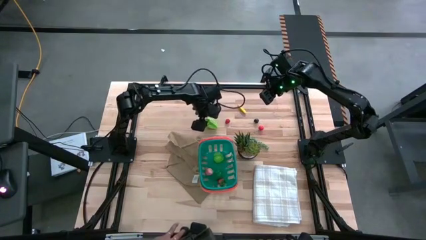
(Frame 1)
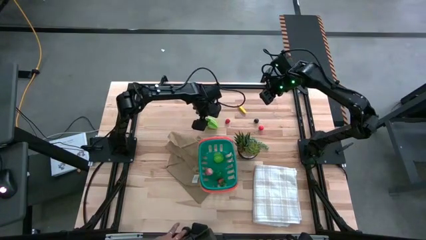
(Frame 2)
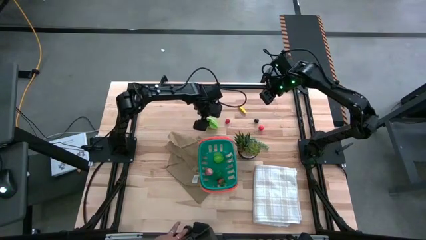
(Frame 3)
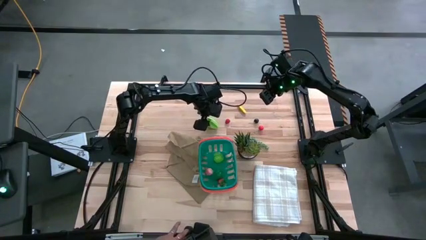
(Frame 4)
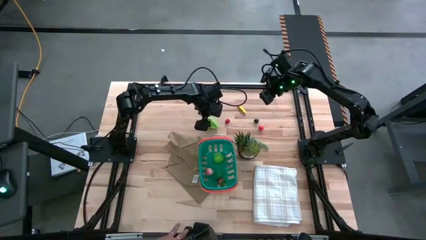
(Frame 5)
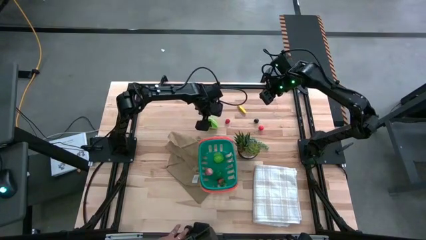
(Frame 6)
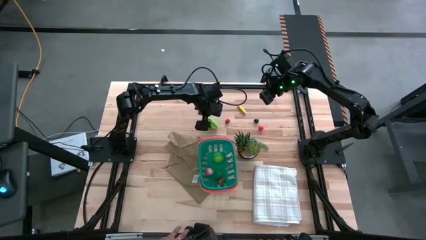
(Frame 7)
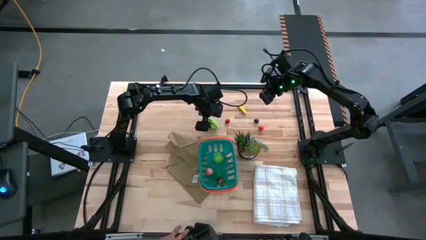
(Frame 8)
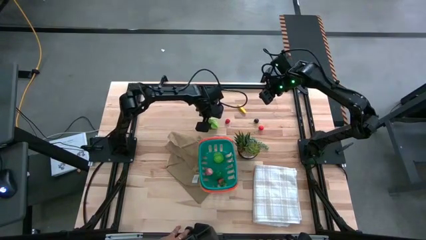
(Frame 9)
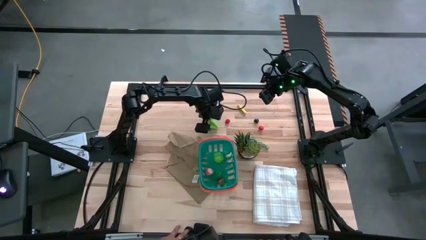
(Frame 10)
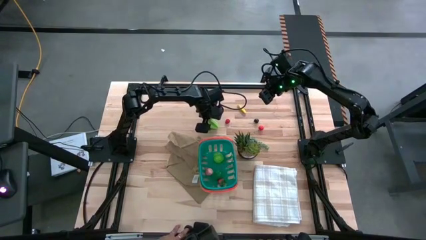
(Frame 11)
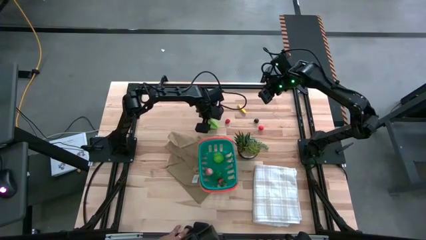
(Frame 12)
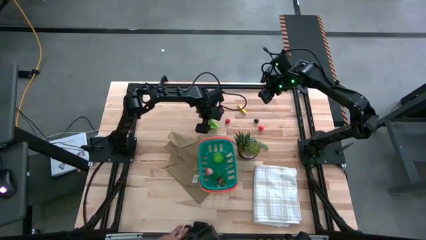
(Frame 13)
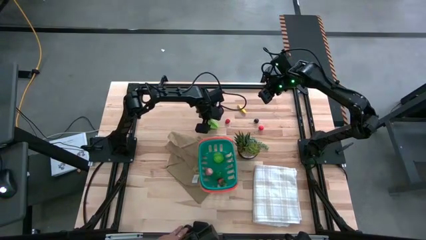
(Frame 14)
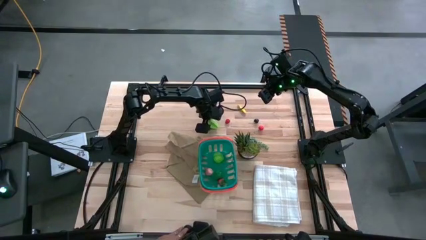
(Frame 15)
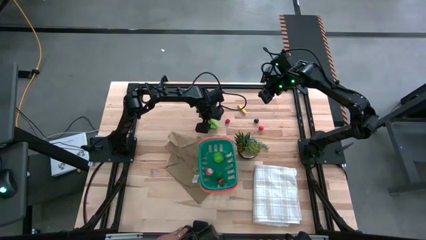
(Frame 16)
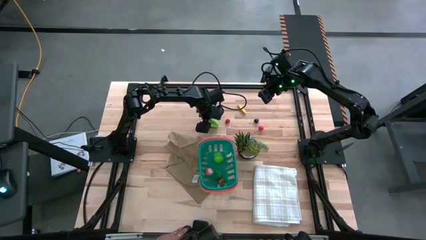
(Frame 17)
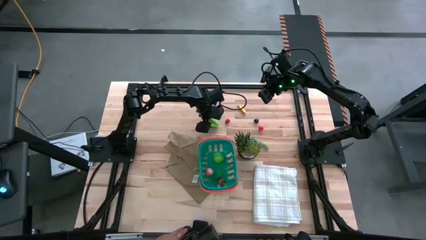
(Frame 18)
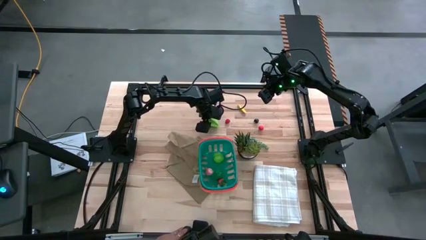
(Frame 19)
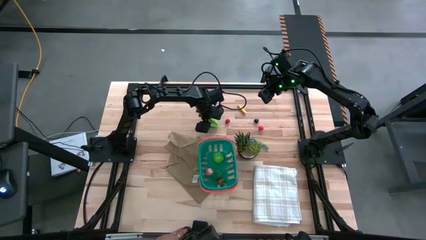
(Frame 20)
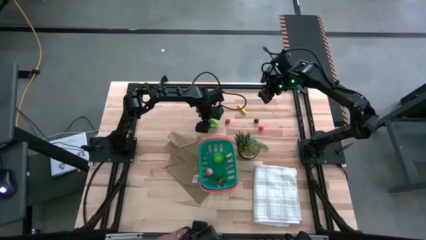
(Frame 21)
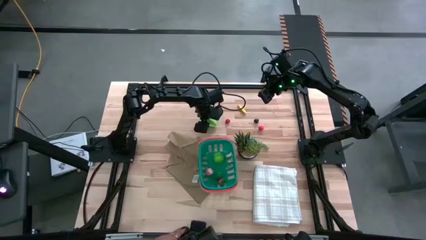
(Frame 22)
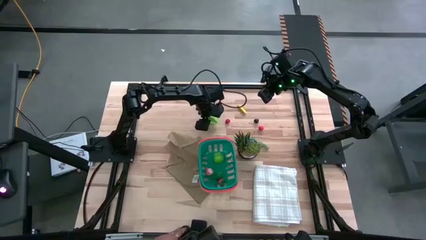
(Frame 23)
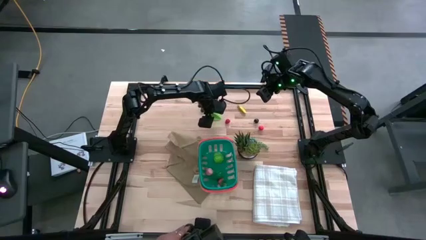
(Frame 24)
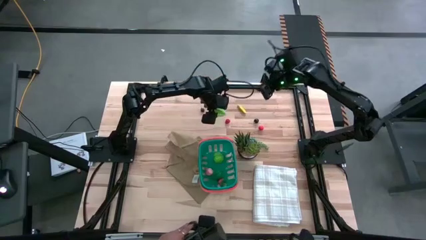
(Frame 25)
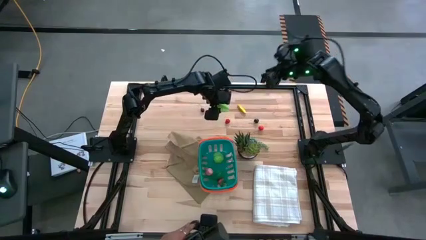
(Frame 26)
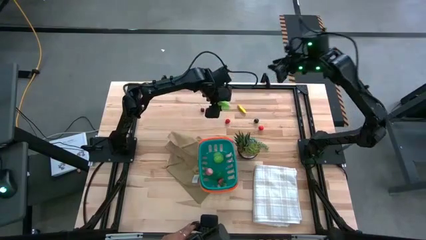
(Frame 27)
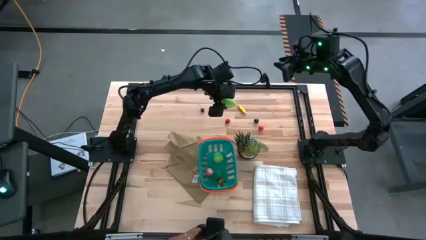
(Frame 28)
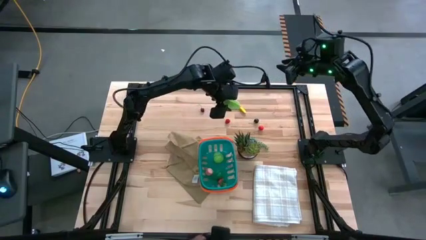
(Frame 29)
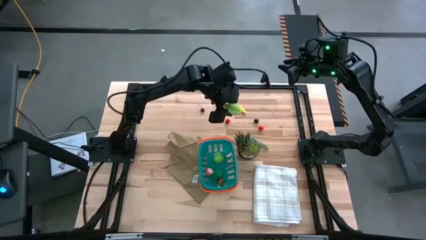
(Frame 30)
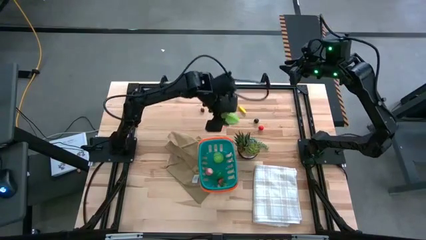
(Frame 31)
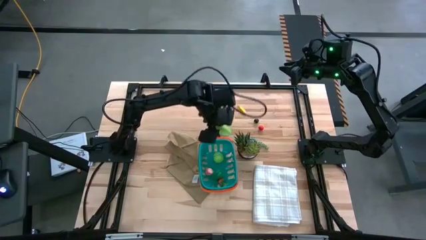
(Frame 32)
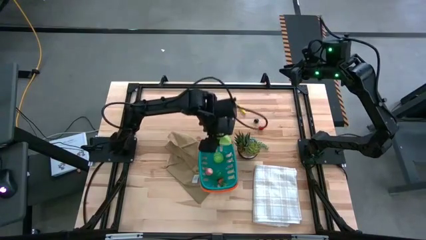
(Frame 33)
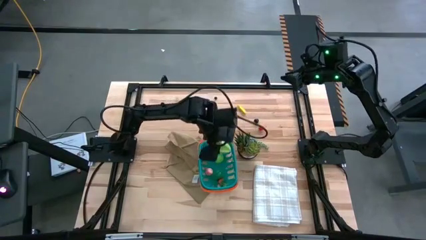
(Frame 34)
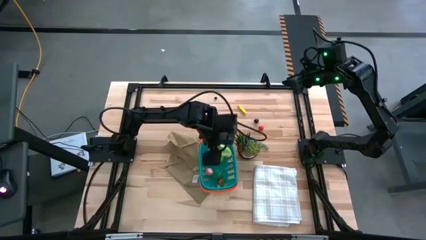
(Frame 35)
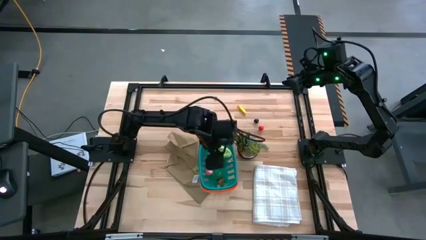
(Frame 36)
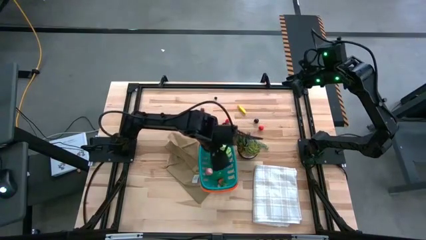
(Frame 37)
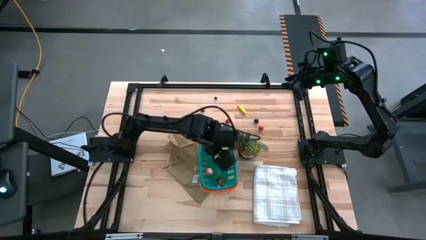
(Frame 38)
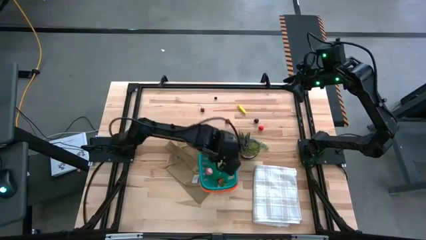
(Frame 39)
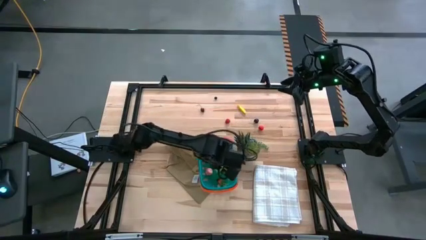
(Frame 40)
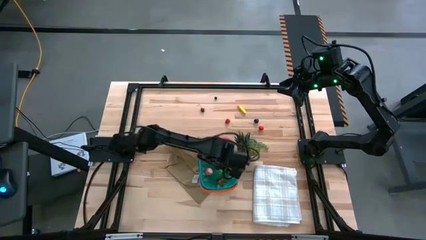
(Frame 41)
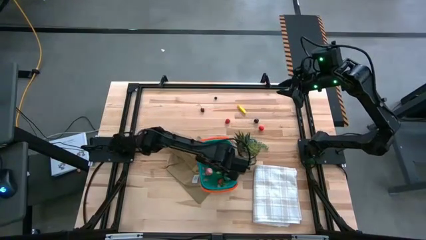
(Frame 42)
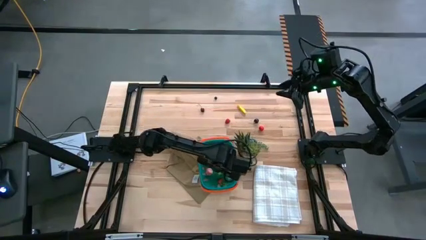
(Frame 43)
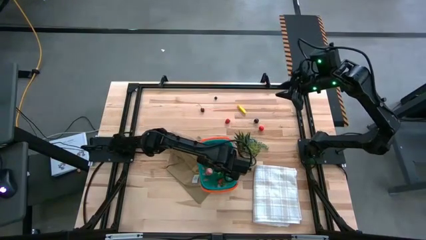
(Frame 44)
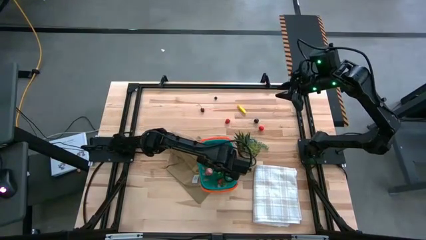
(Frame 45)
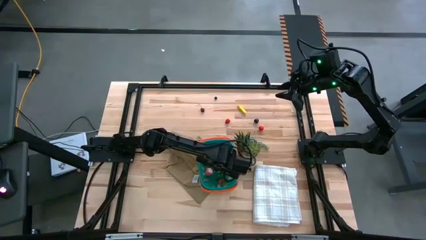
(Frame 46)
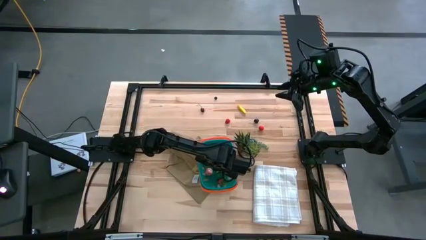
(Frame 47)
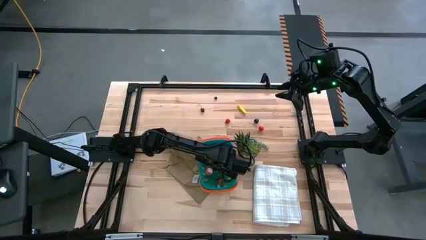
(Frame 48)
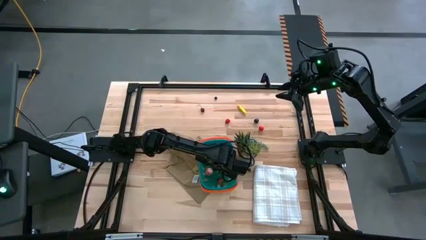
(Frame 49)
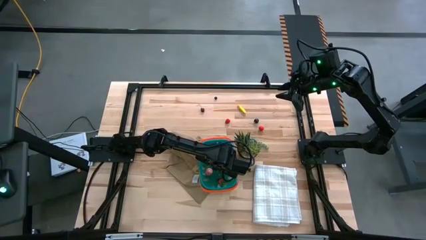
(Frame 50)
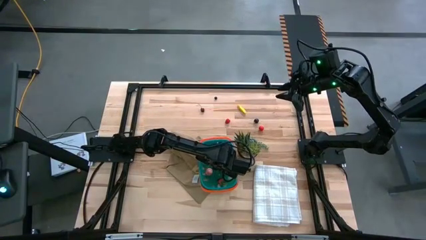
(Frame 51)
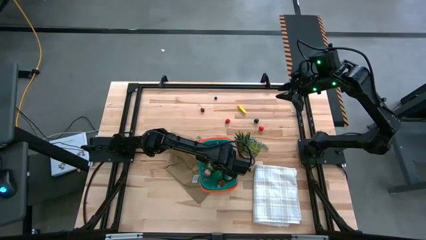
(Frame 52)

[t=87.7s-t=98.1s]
Task: Pick and placing Produce into tupperware
Put the green starfruit into the green basket

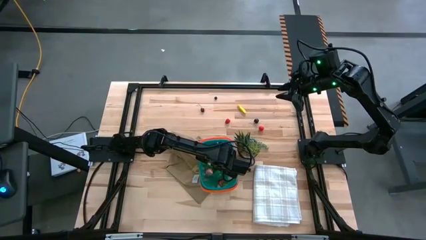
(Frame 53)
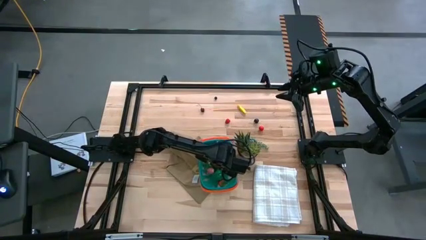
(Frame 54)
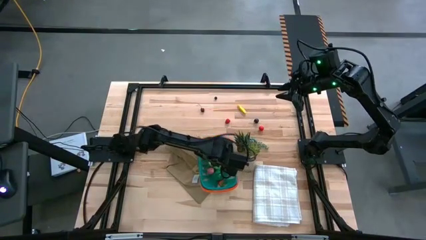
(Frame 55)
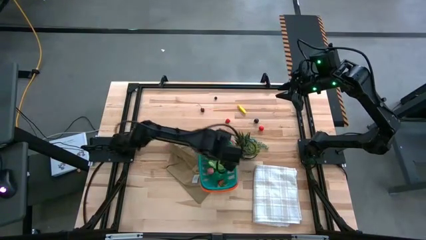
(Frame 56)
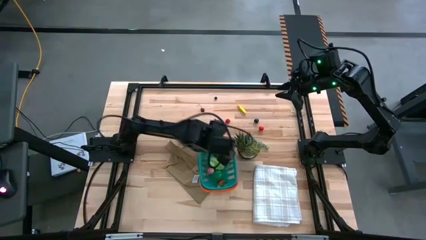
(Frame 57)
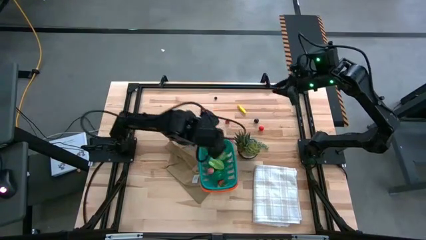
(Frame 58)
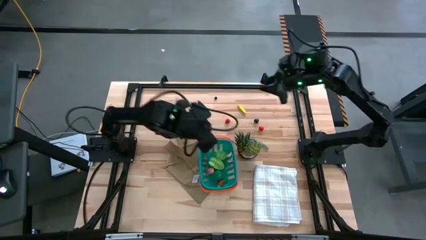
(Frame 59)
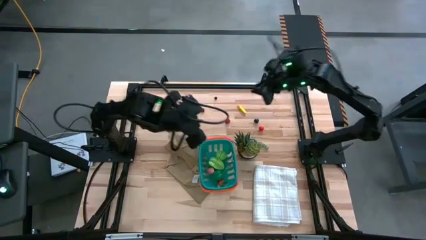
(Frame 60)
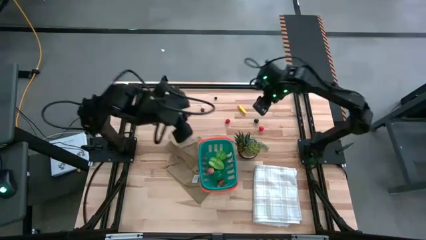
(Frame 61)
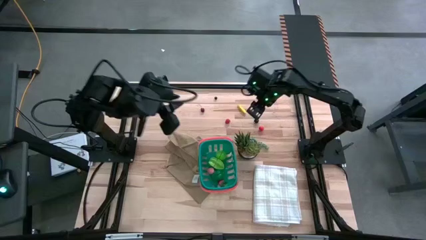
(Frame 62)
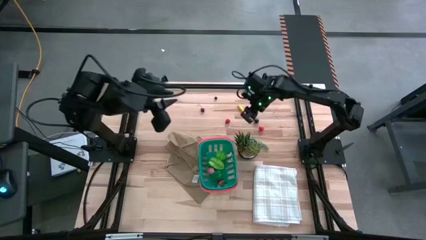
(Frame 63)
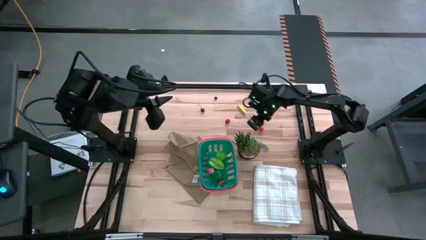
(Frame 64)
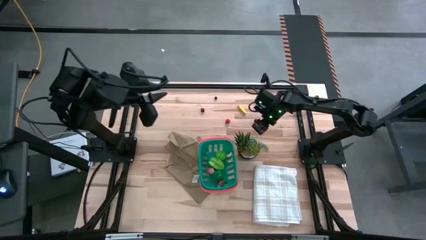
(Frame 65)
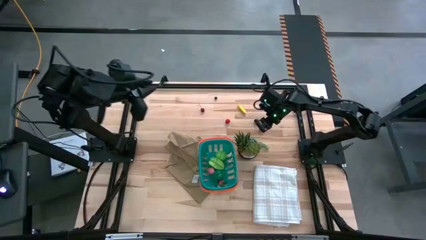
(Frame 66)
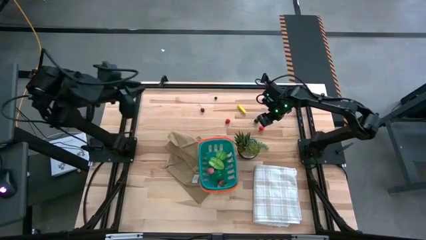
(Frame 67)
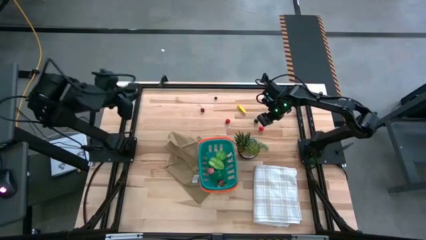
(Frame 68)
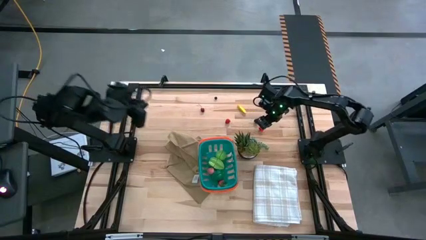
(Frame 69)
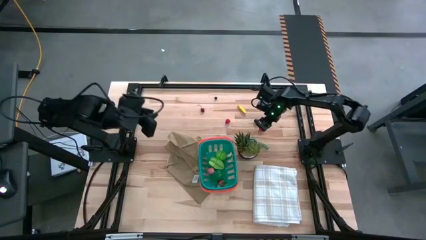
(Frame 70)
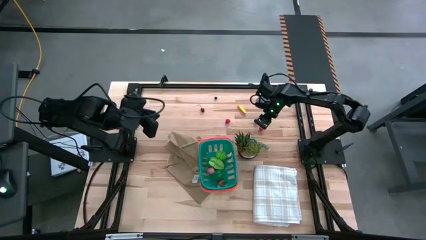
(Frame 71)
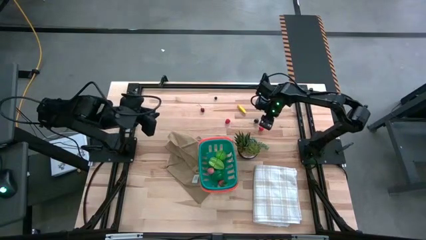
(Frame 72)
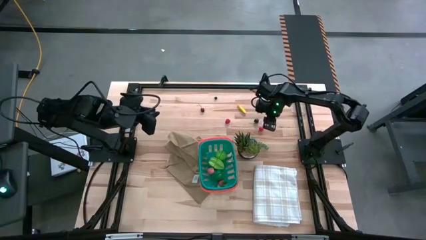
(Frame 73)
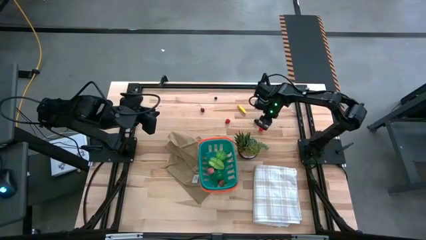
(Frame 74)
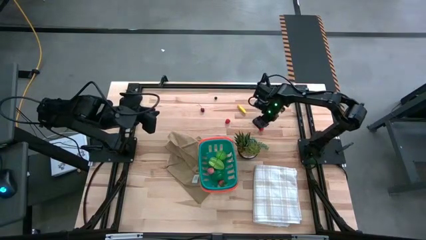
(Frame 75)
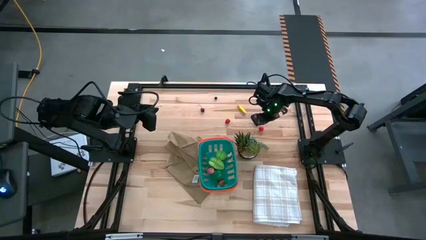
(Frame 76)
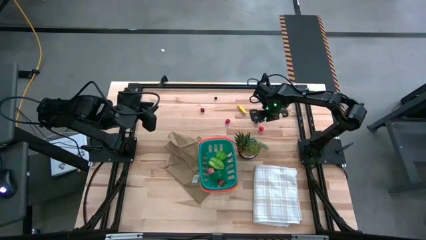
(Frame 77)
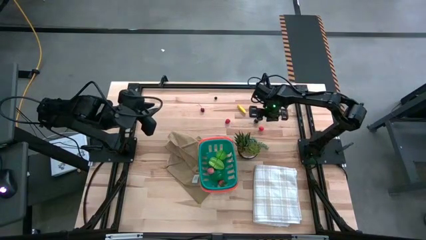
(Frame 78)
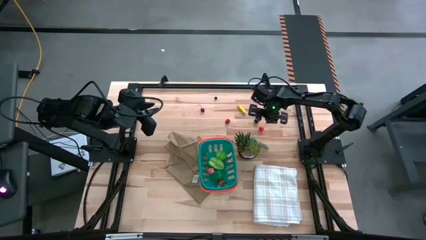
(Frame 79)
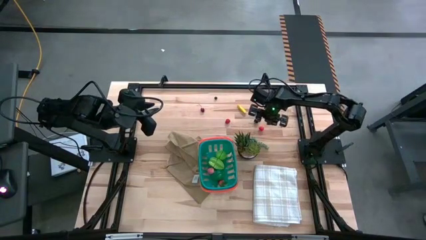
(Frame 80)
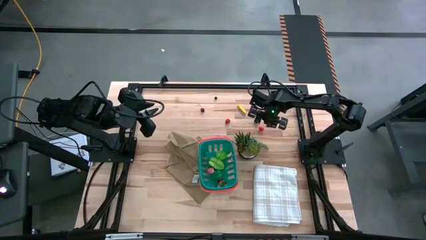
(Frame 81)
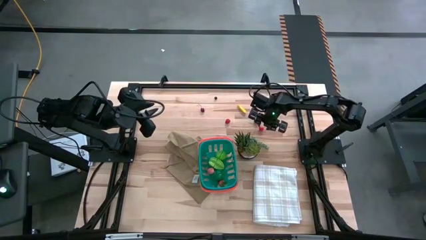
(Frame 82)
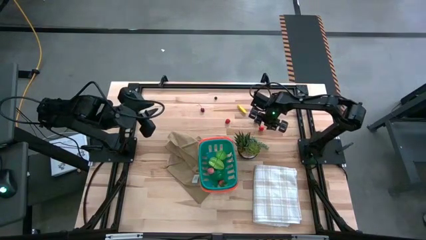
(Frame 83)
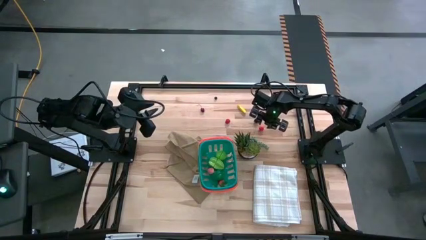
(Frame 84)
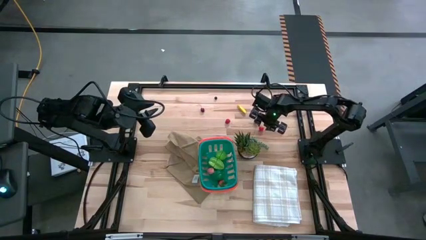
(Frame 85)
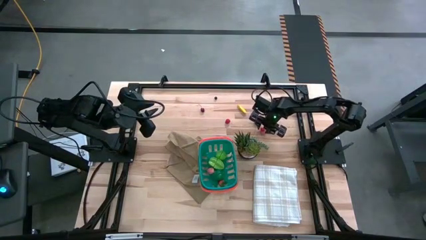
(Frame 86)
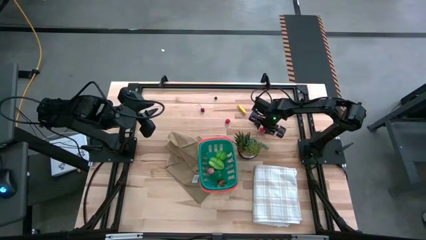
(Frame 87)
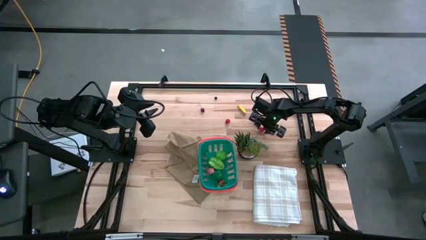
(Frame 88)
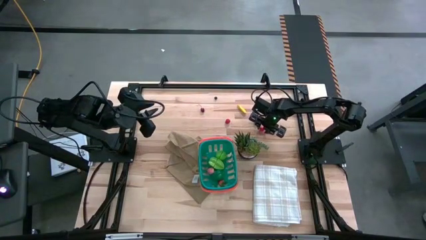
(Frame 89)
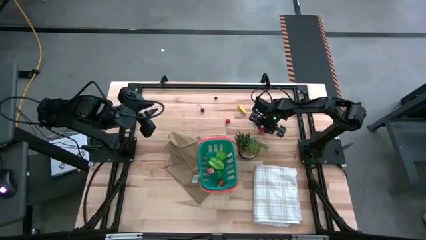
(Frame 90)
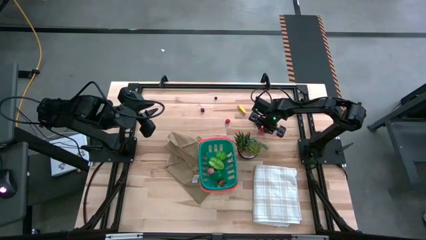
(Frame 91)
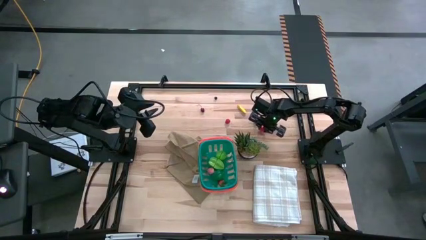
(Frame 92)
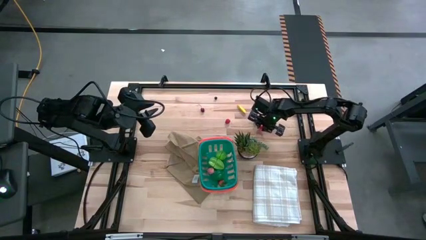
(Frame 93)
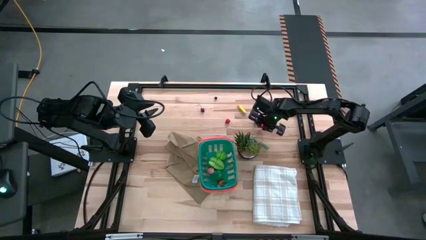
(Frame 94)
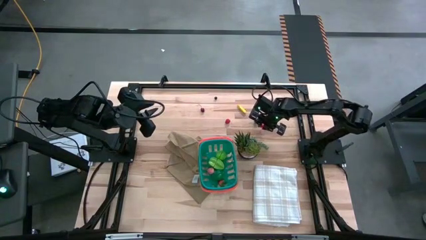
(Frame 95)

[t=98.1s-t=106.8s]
Put the right red cherry into the green basket
